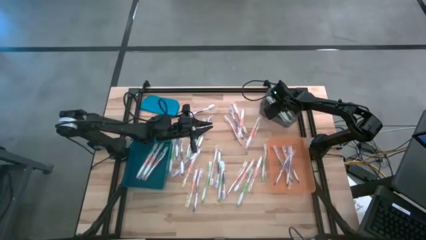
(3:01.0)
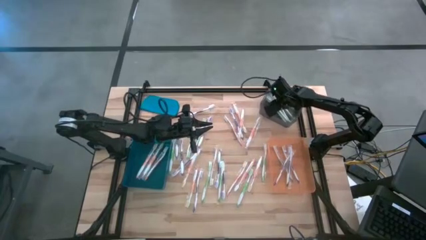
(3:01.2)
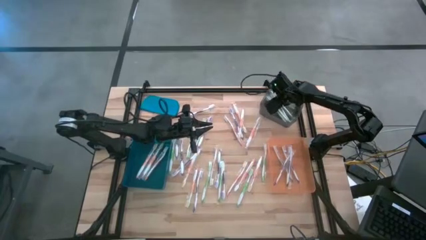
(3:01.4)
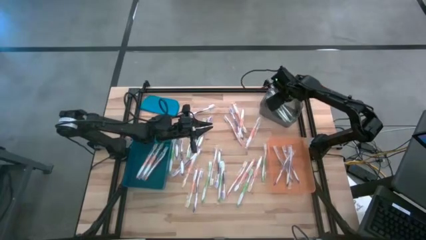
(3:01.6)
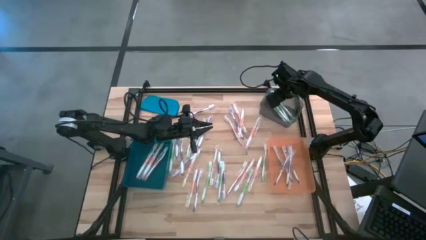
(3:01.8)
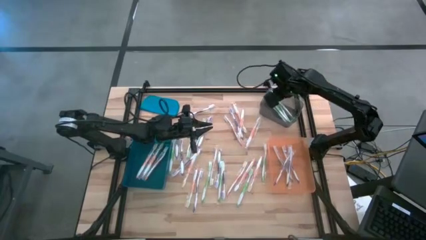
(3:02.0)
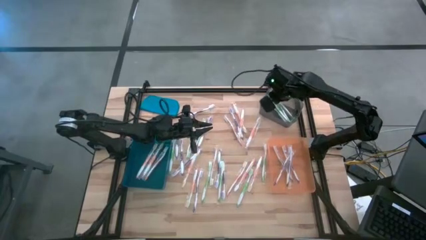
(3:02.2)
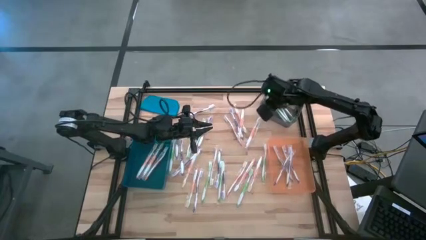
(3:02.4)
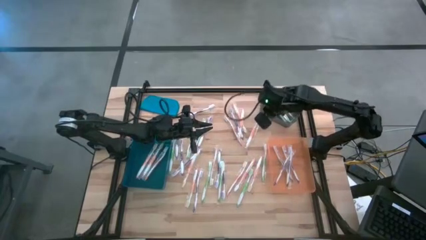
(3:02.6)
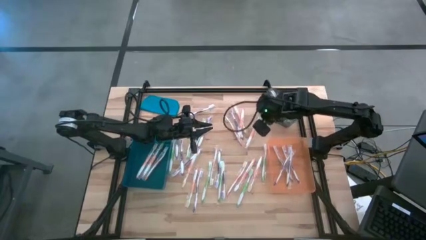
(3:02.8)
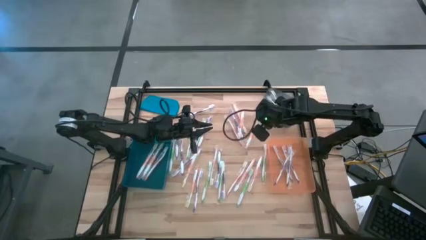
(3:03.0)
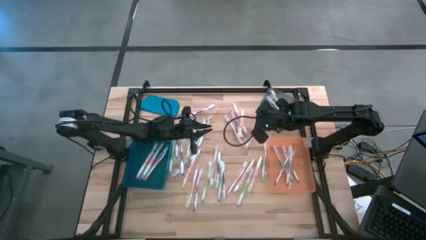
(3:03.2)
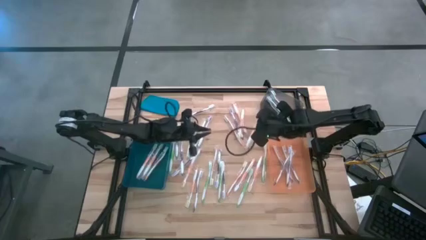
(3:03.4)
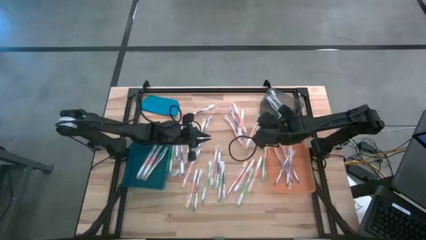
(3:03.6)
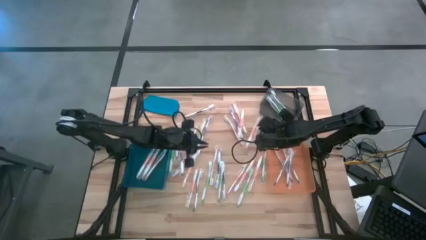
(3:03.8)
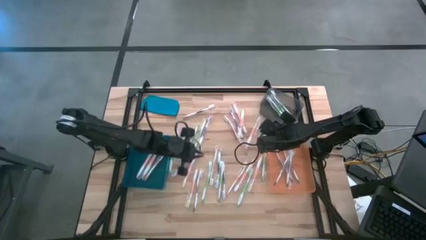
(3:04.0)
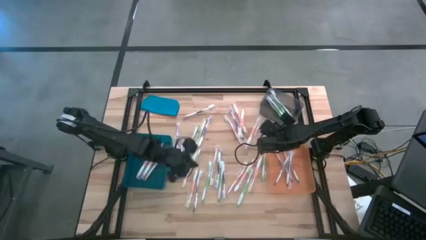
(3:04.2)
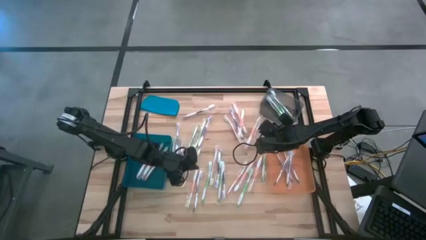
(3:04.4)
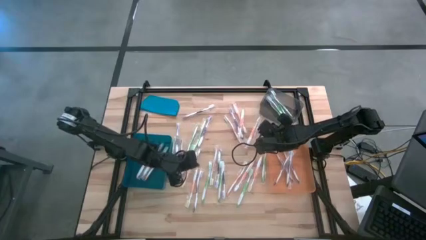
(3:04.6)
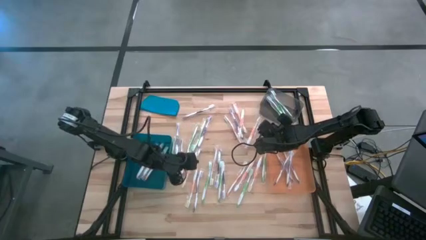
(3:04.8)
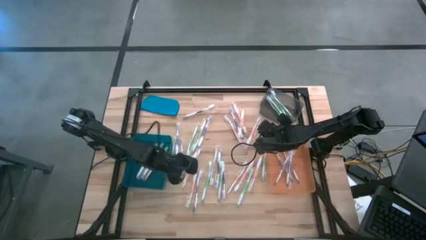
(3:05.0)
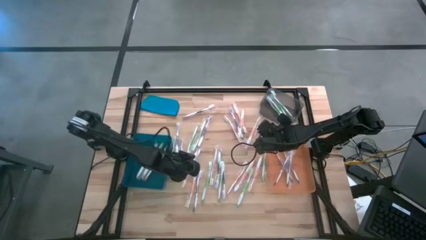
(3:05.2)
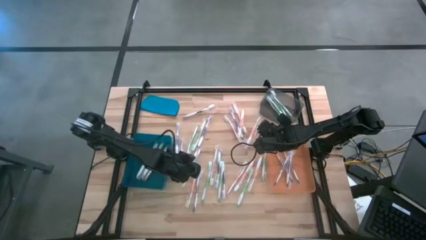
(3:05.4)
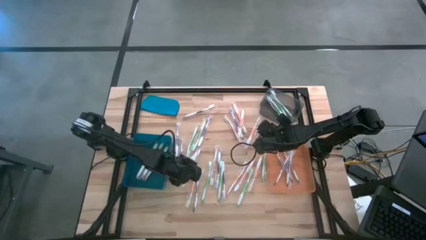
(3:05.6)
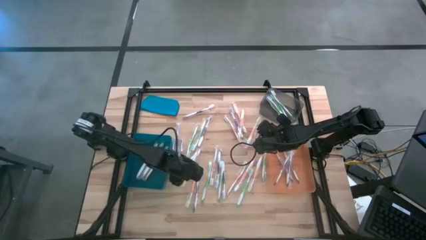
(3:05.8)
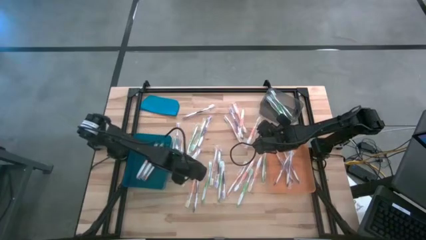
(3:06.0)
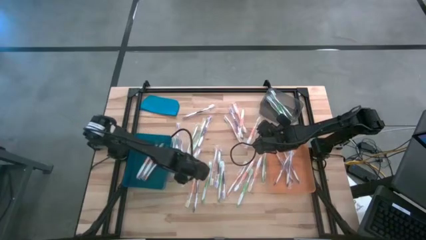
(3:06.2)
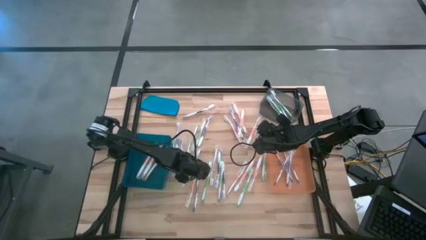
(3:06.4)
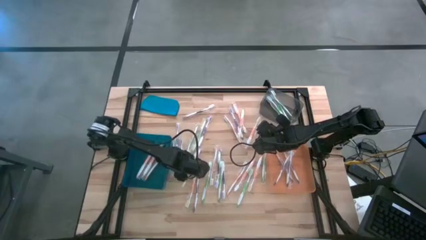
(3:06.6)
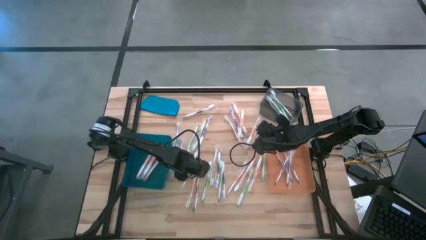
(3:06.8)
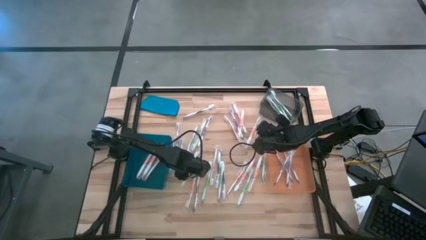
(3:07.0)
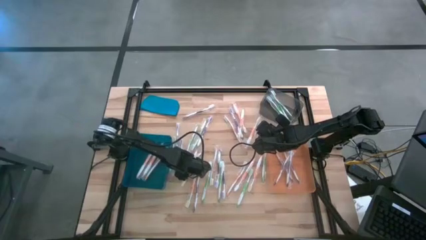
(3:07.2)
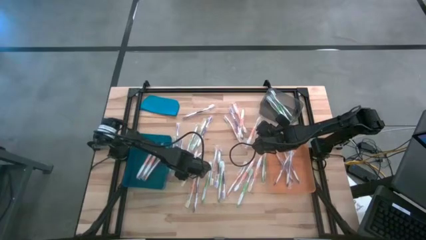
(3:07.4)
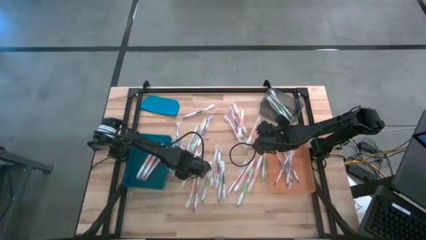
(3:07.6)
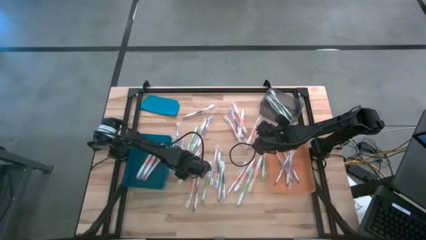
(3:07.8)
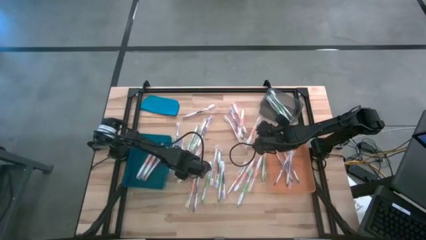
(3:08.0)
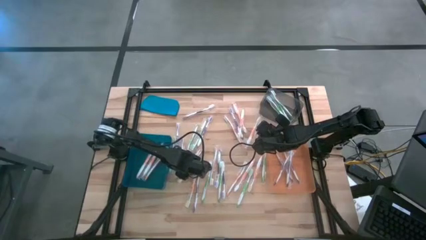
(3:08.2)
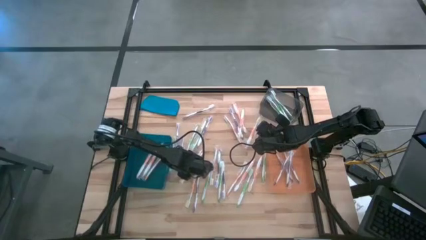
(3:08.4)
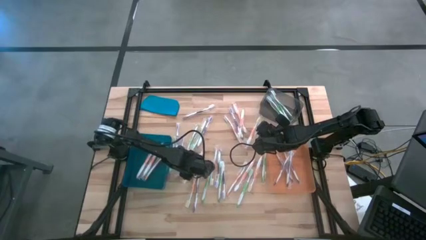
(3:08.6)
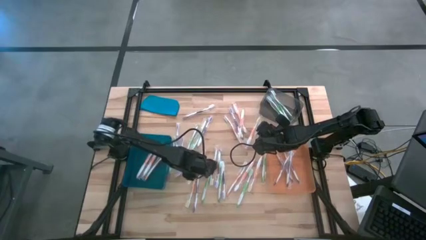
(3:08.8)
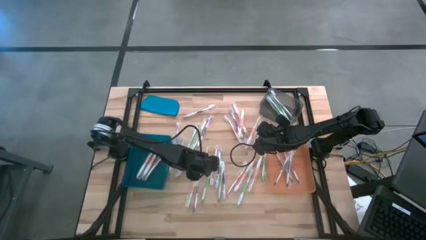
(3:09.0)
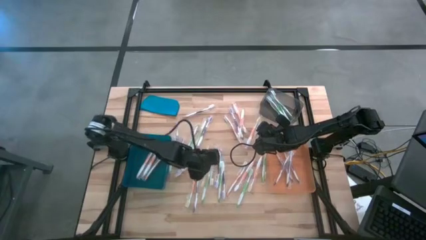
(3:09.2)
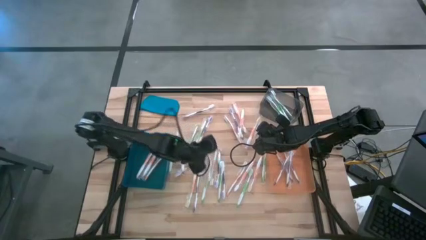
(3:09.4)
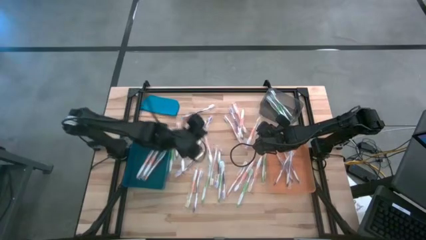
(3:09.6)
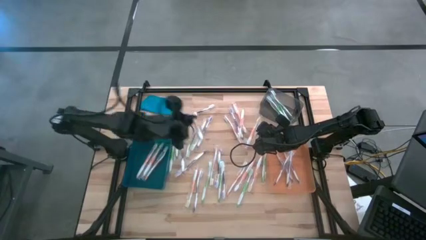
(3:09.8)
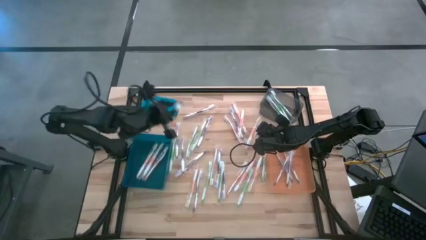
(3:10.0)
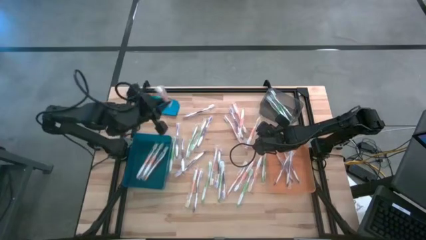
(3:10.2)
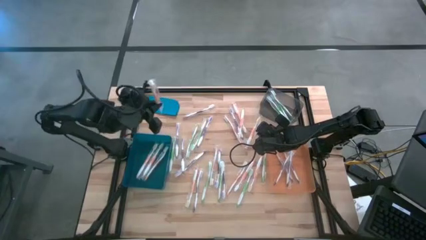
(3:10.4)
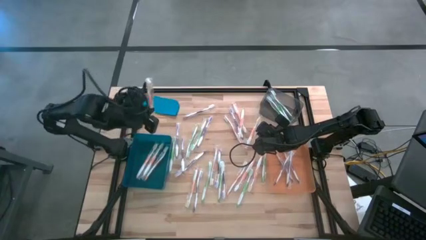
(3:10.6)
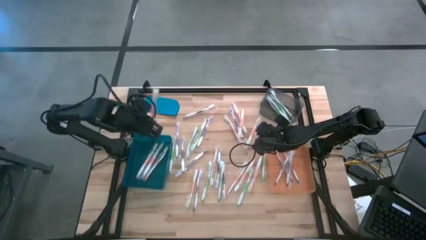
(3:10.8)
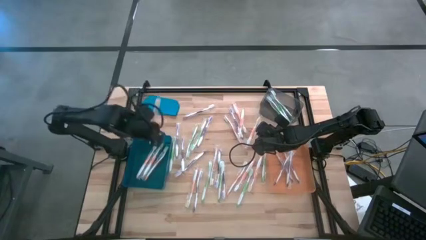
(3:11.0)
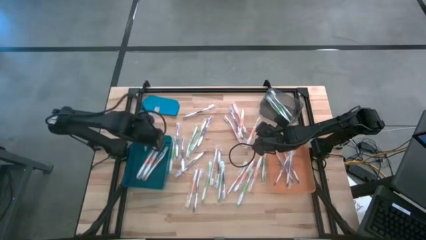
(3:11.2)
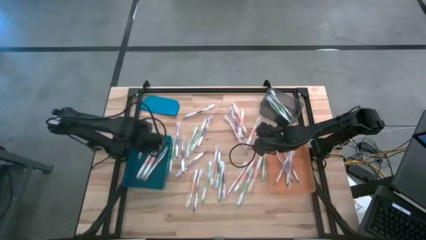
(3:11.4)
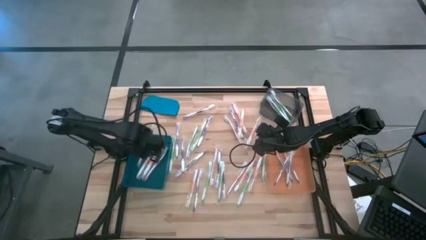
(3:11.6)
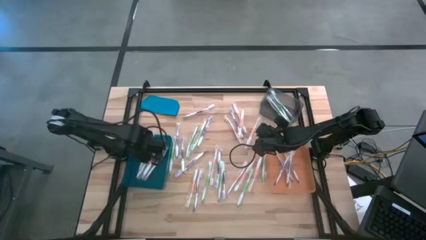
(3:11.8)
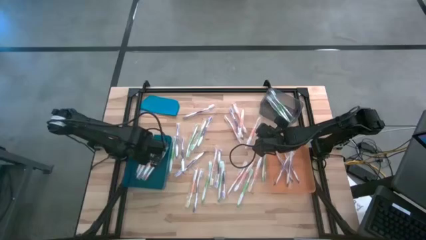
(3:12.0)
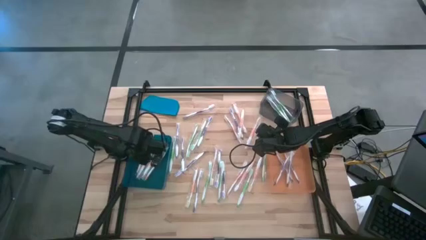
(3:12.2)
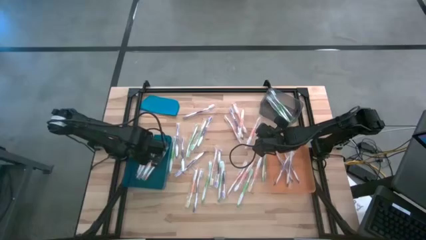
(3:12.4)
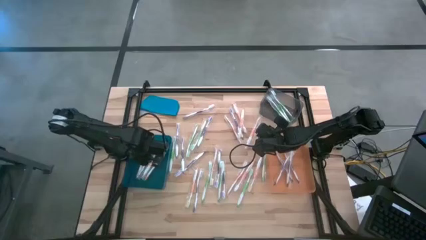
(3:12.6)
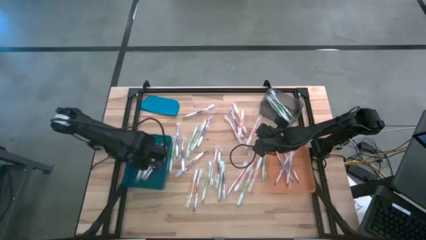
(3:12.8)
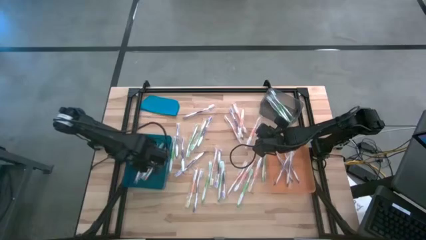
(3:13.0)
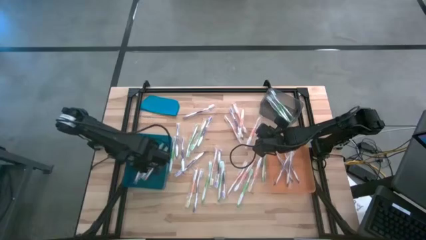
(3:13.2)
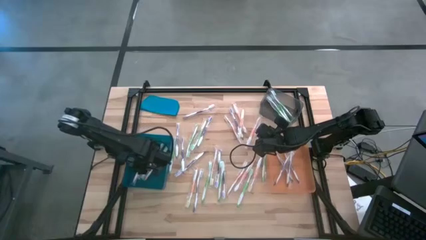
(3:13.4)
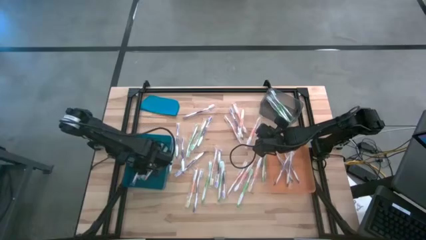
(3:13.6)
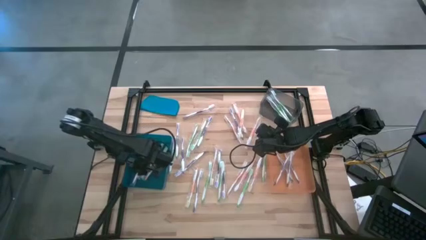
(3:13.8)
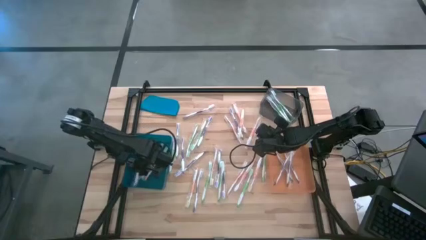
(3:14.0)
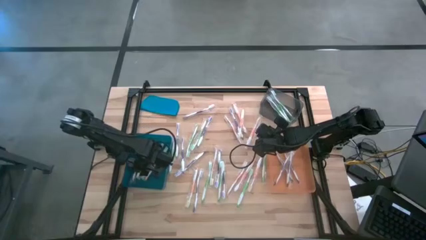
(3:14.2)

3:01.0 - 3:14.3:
Task: Pick & Place Toothbrushes
Put the orange toothbrush into the blue bin
